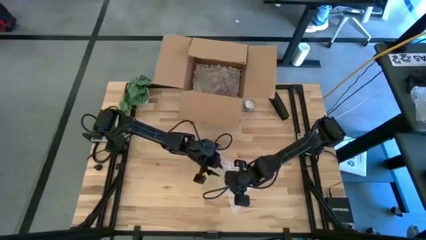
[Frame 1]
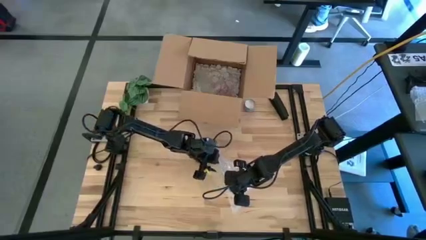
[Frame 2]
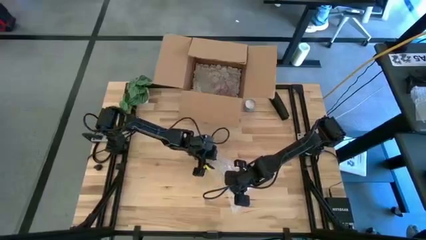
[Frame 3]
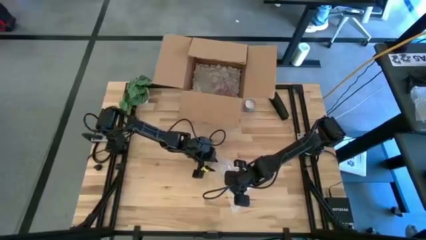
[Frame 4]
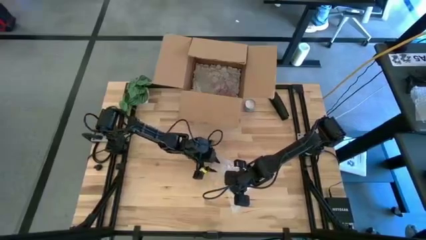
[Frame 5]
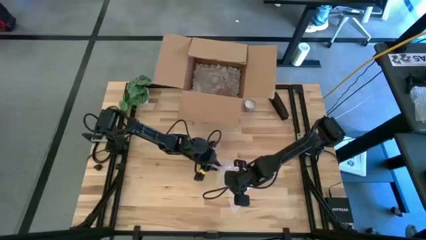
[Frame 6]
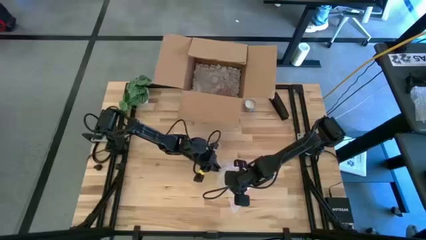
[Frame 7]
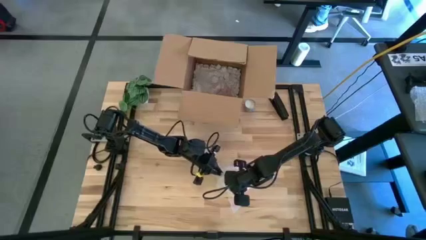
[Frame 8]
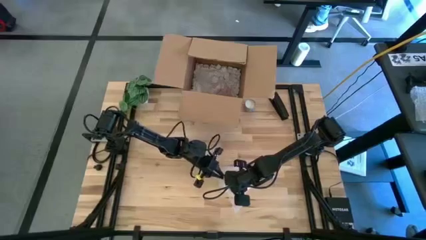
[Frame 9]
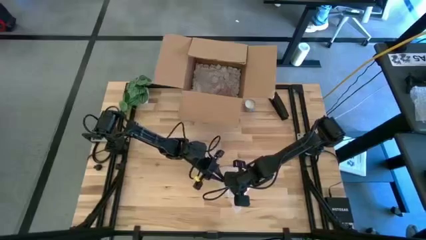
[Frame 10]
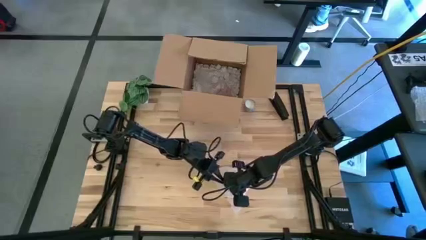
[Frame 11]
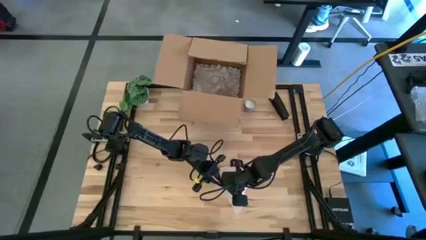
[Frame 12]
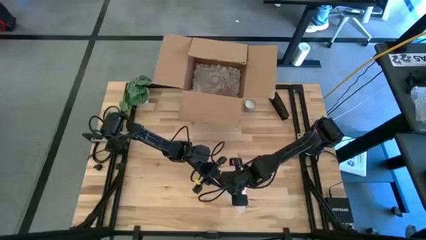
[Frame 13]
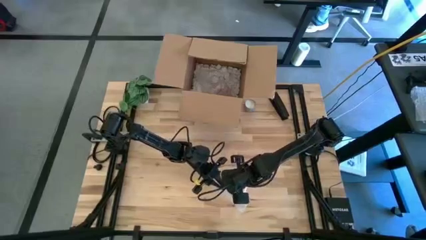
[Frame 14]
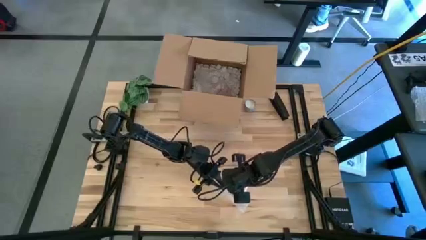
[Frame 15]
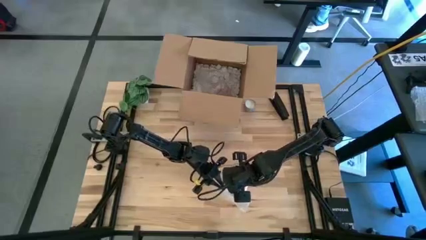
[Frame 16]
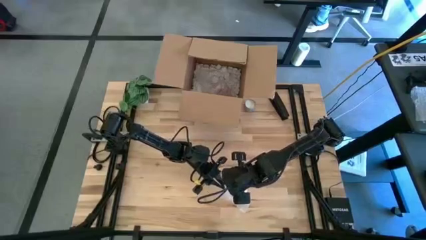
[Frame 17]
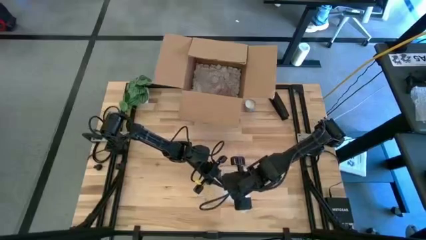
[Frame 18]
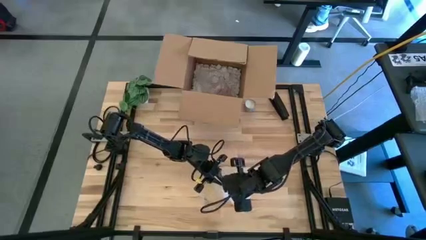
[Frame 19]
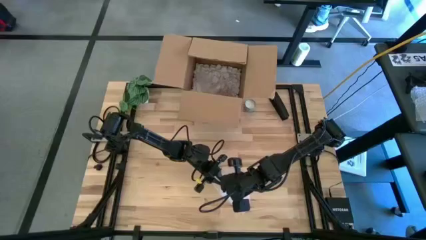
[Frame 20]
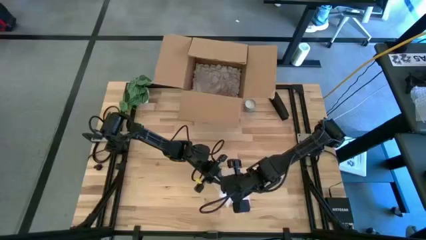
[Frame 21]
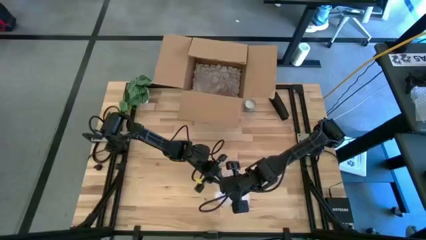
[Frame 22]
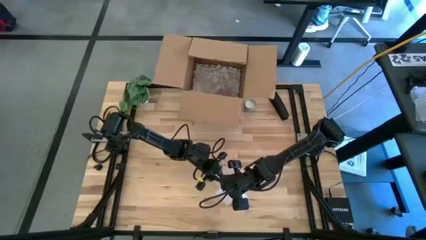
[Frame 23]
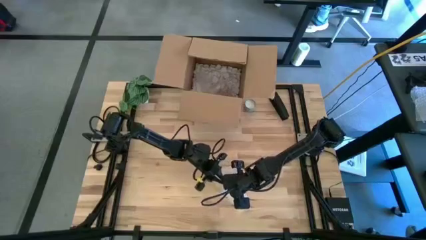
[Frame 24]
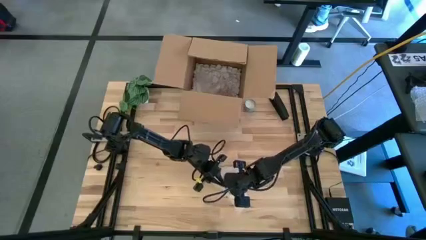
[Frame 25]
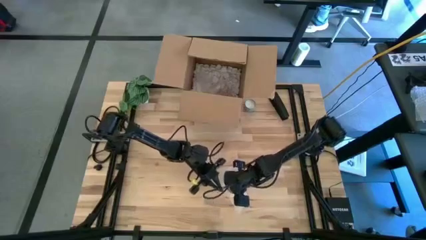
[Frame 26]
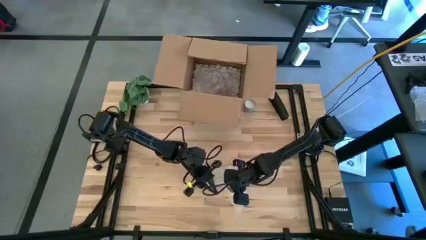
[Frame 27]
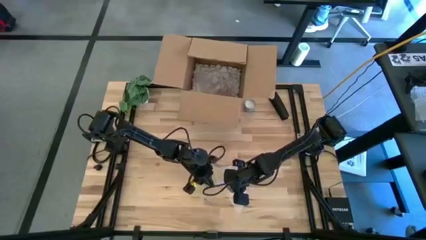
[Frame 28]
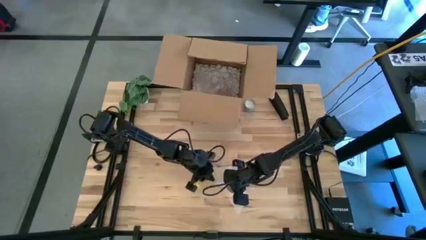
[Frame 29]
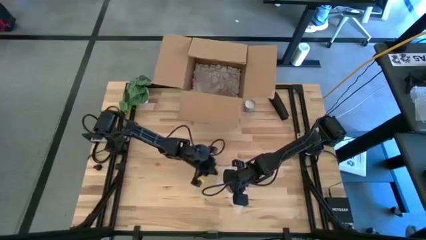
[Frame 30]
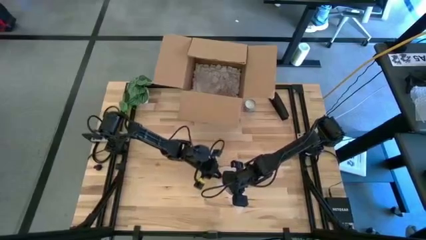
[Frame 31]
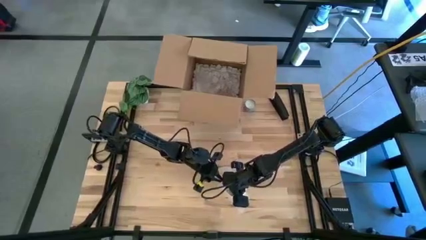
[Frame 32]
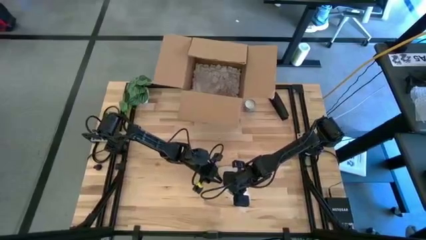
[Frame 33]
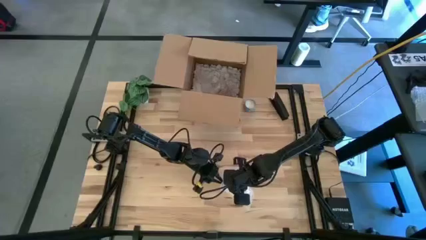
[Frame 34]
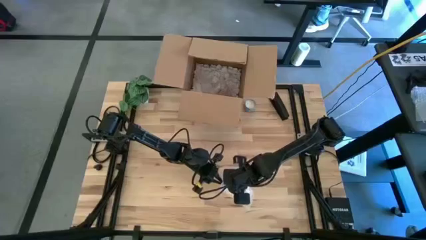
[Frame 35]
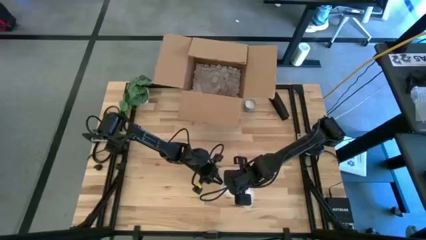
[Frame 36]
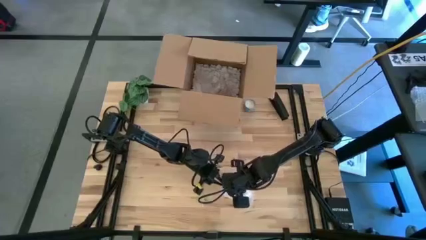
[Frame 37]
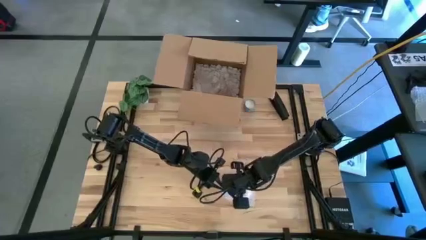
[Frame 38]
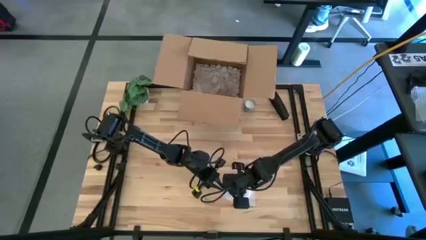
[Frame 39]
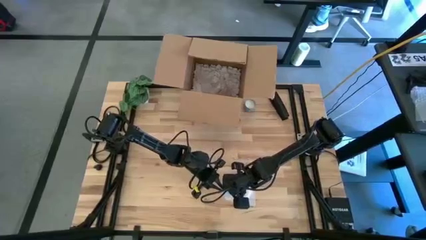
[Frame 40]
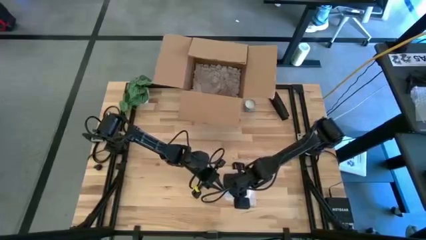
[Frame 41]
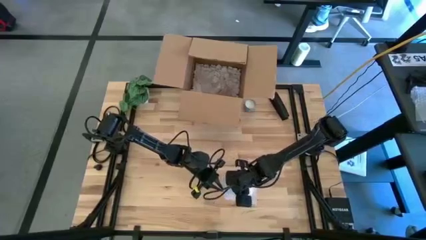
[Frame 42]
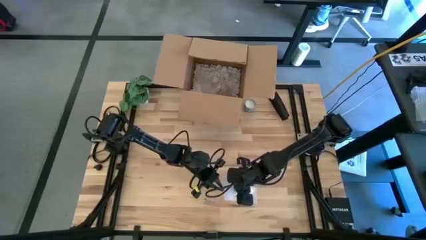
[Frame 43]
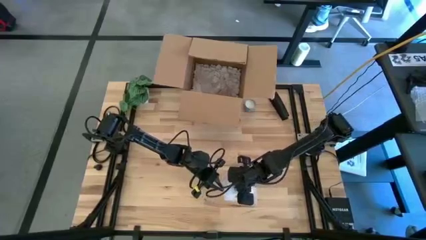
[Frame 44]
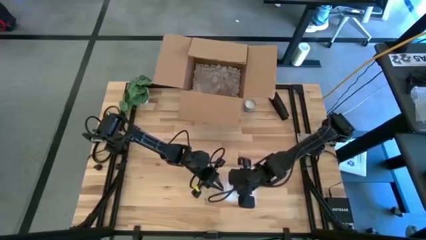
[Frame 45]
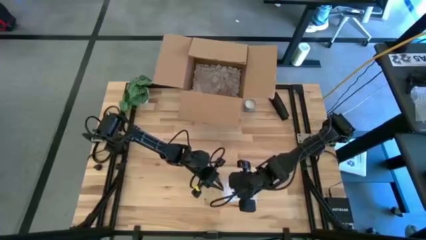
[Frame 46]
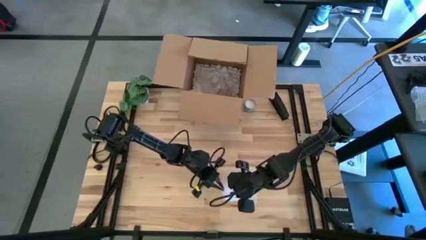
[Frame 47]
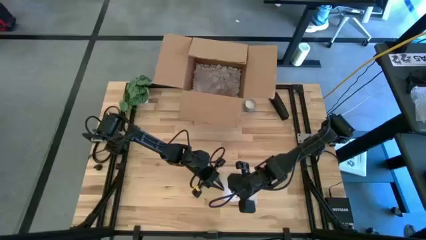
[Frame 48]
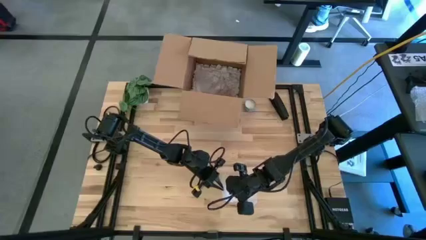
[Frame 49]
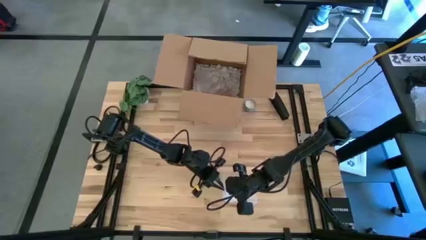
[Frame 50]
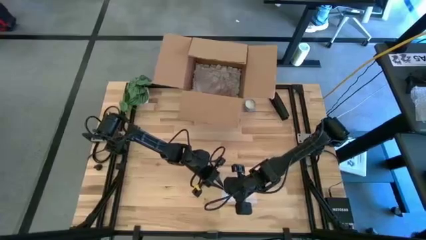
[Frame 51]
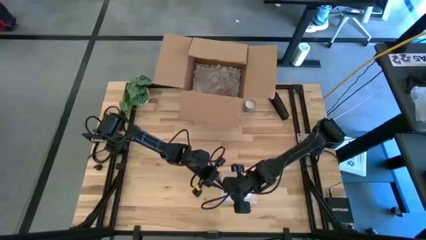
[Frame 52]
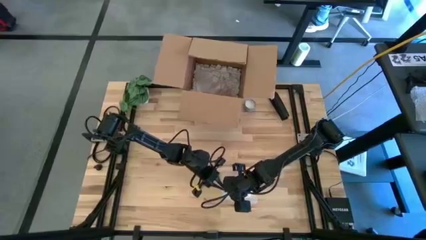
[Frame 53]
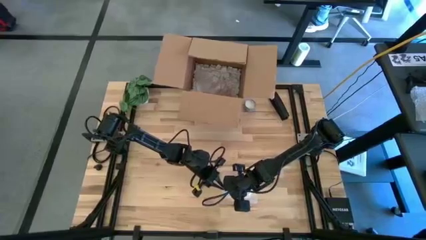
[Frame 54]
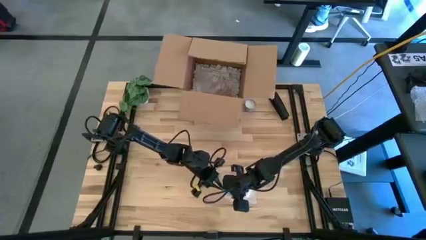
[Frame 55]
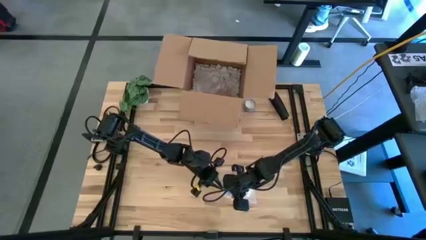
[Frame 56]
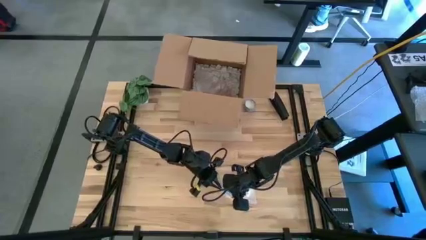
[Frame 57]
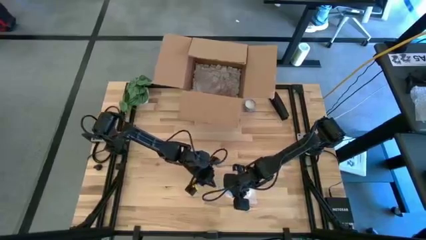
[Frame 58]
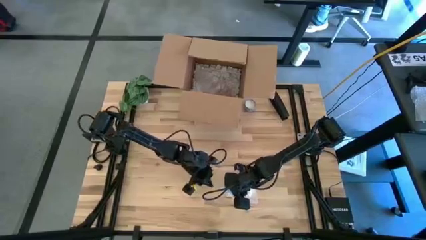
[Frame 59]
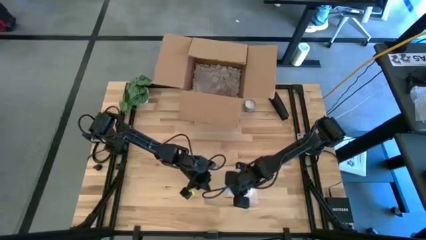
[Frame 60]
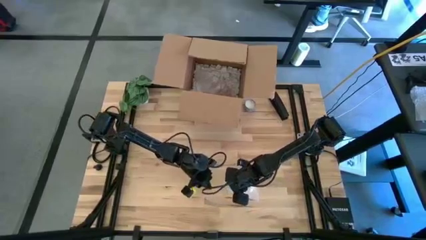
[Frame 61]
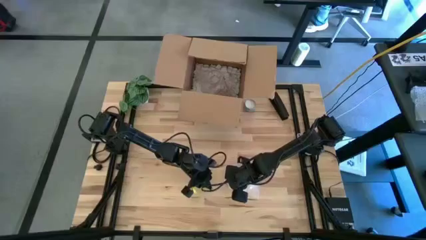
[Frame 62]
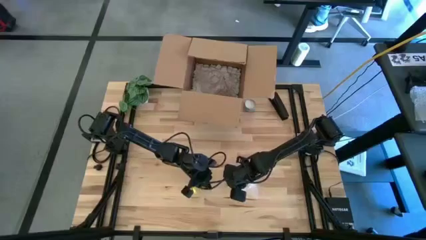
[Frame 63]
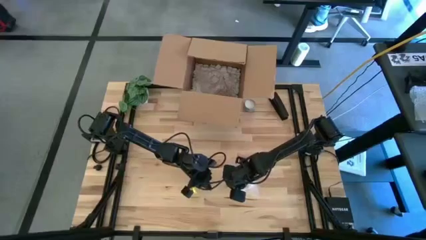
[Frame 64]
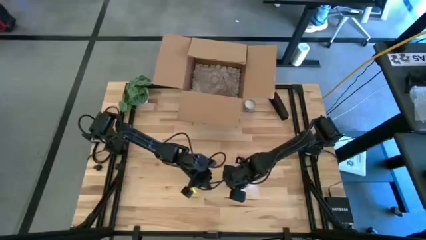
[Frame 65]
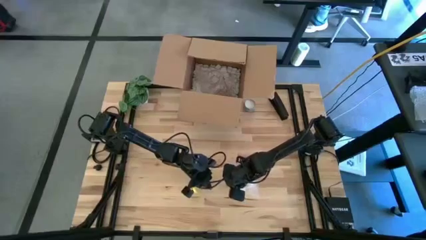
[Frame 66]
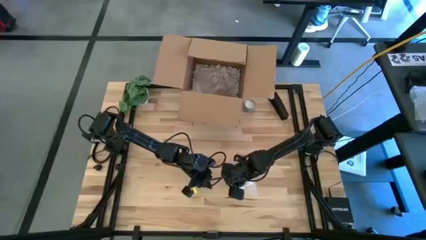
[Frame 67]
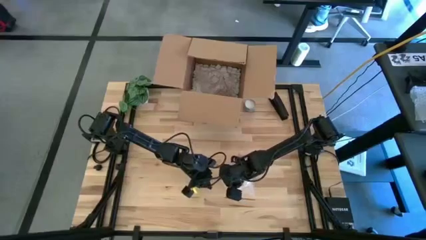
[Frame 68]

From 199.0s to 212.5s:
Task: wrap mug
Wrap the yellow mug with the bubble wrap

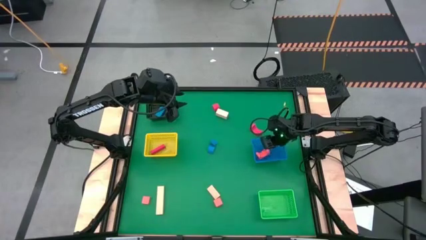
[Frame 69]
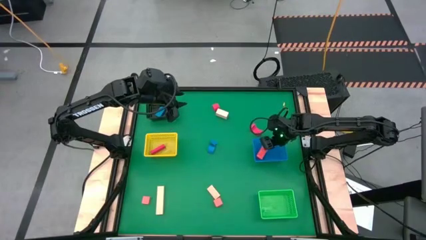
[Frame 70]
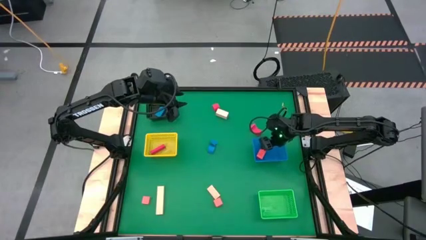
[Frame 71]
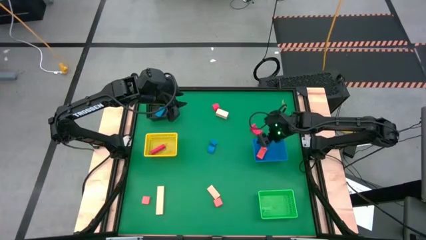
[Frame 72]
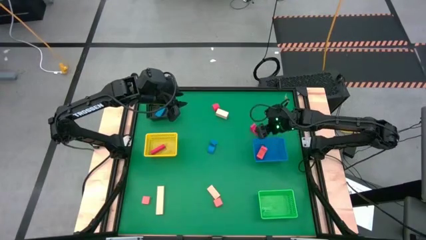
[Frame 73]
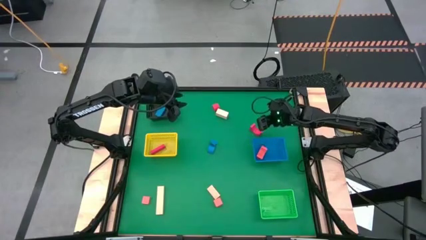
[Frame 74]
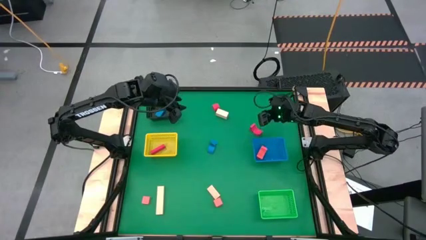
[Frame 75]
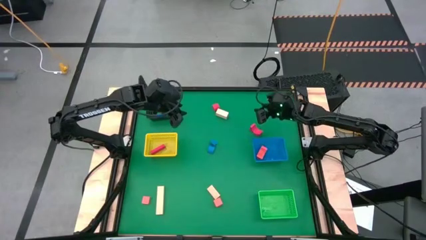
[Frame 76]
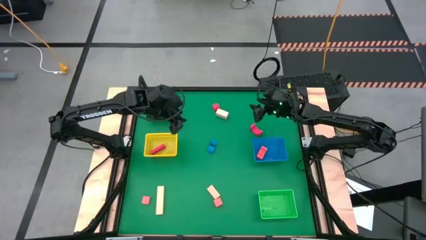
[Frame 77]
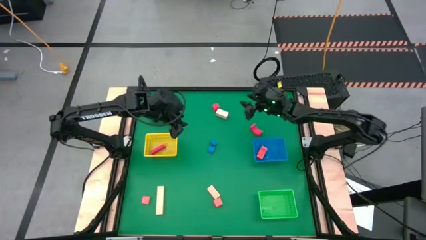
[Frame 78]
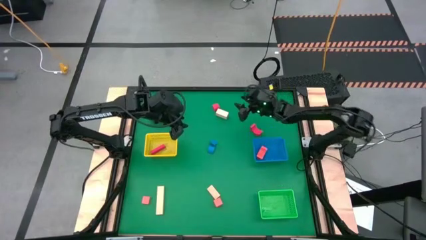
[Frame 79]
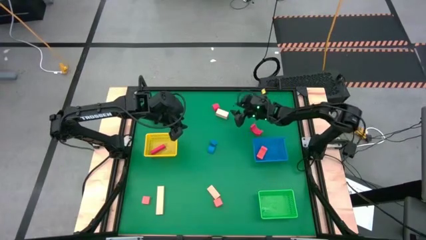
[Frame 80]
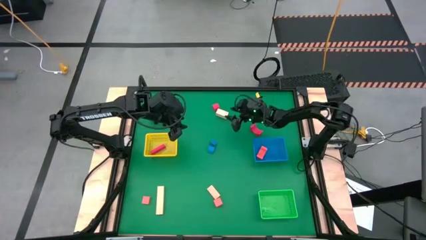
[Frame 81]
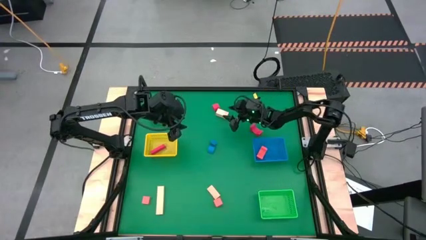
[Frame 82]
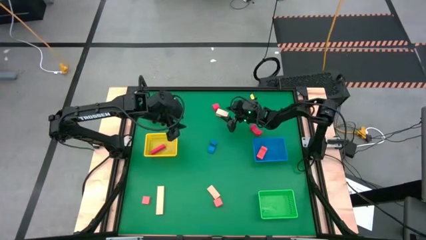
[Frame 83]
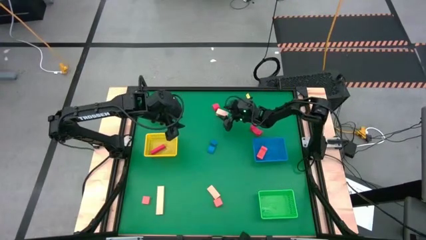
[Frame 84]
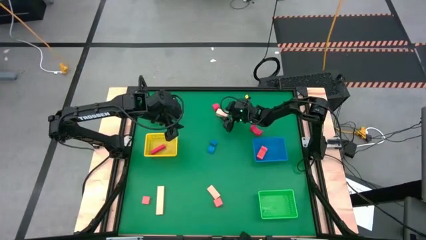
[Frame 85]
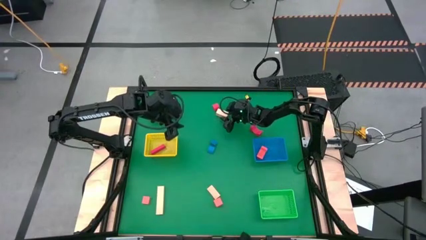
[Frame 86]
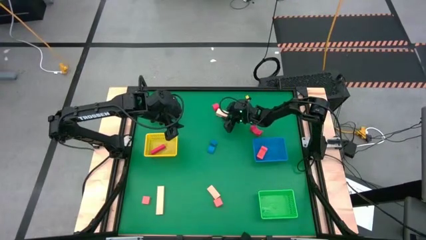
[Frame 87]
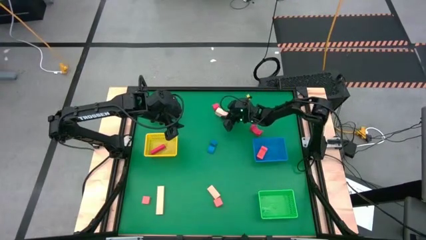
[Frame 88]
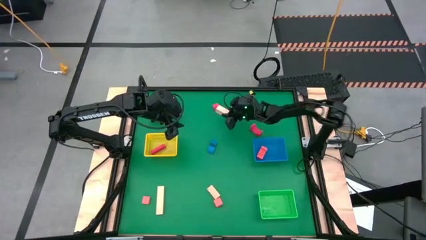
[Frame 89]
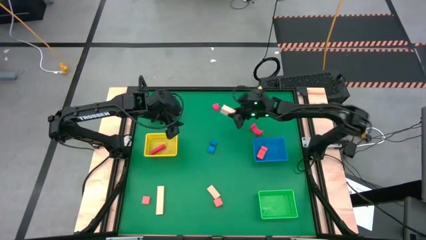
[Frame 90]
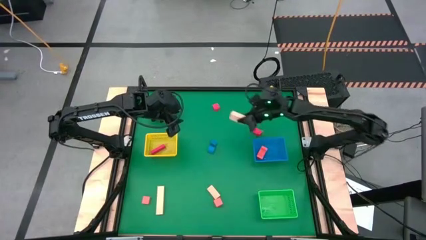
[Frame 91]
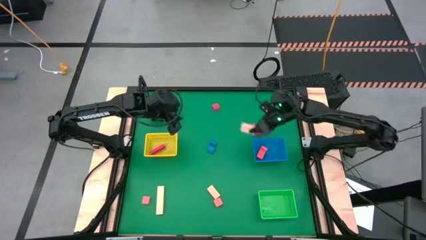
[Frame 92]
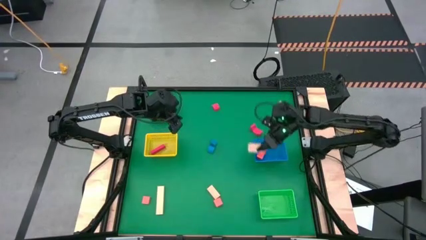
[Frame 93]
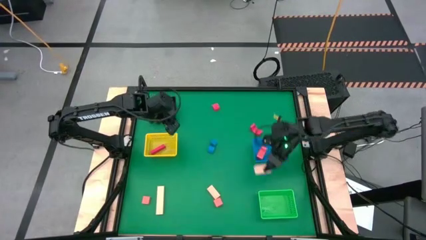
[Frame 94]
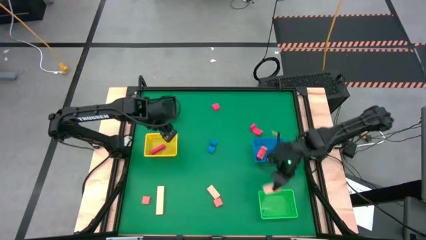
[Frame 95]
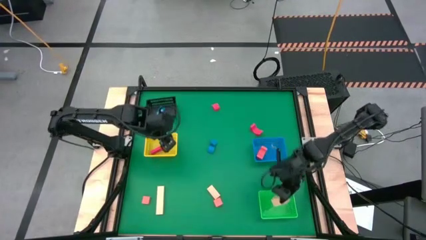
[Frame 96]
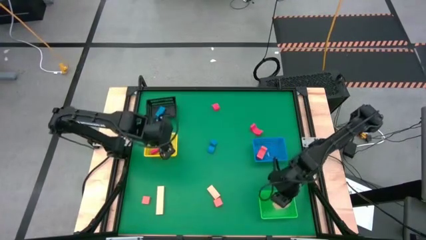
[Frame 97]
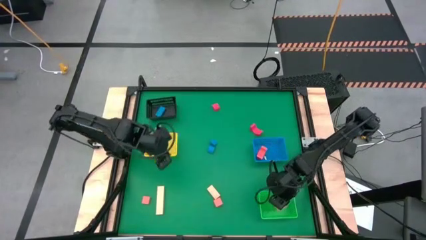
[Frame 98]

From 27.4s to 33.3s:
Task: Sort & place blocks by color
Put the top right brown block into the green bin
